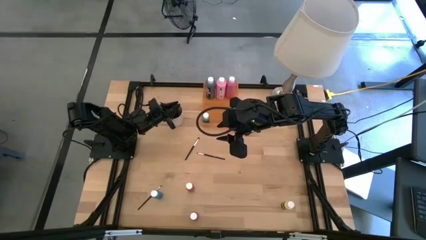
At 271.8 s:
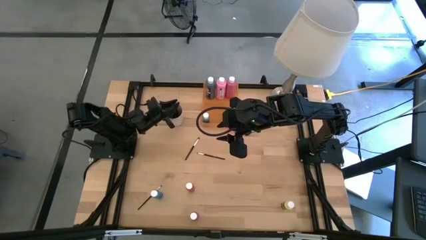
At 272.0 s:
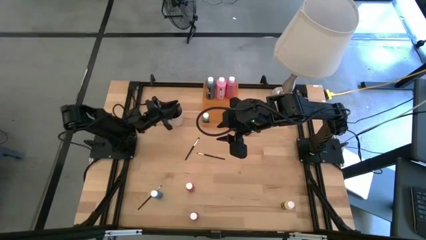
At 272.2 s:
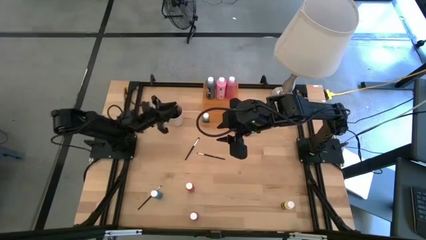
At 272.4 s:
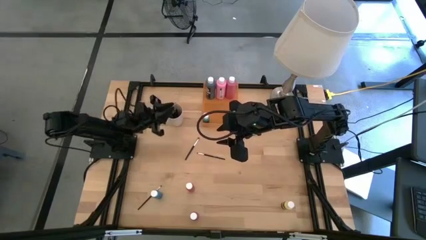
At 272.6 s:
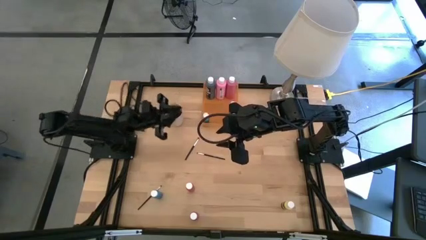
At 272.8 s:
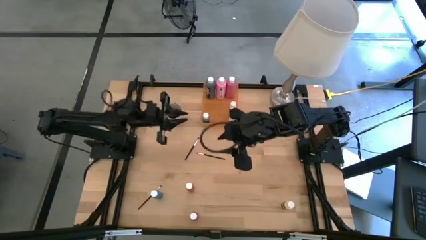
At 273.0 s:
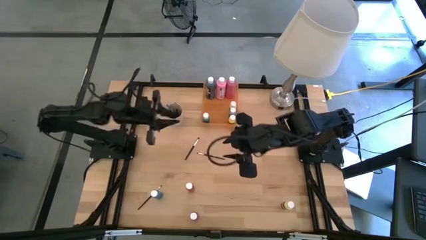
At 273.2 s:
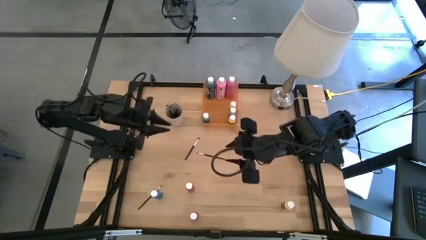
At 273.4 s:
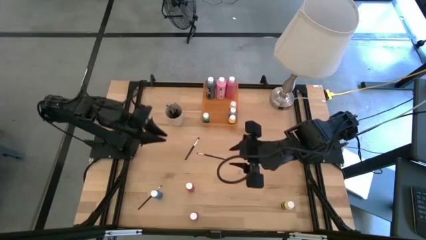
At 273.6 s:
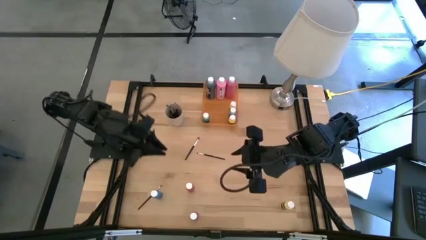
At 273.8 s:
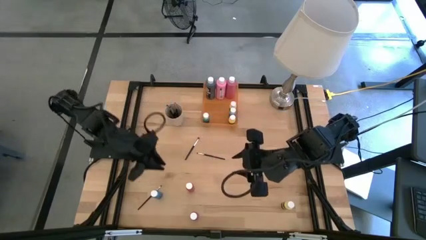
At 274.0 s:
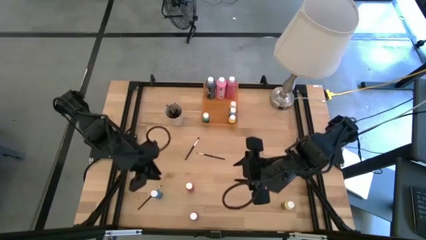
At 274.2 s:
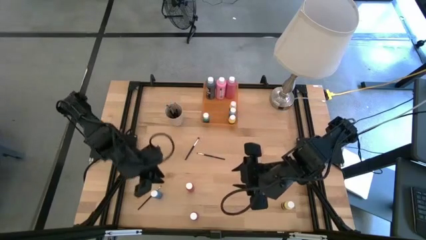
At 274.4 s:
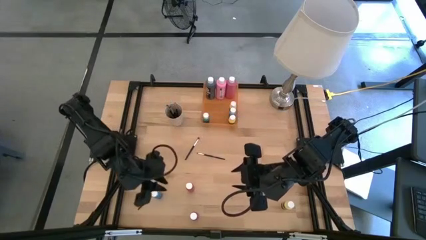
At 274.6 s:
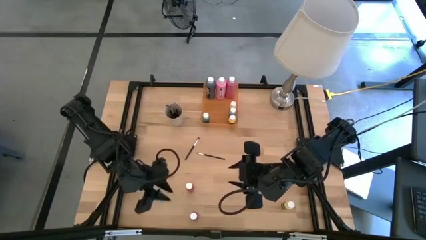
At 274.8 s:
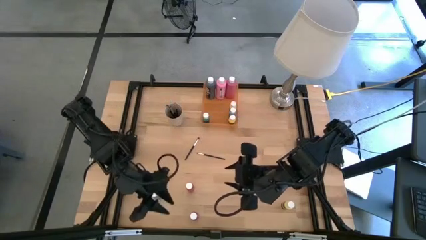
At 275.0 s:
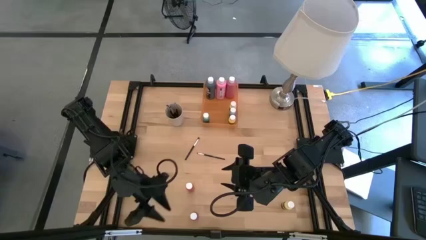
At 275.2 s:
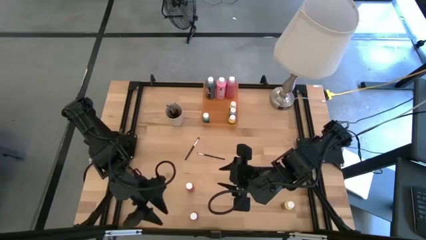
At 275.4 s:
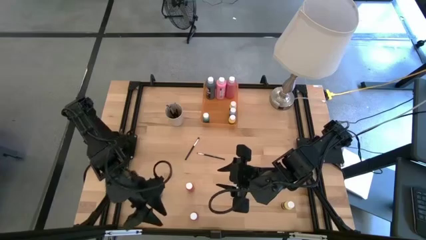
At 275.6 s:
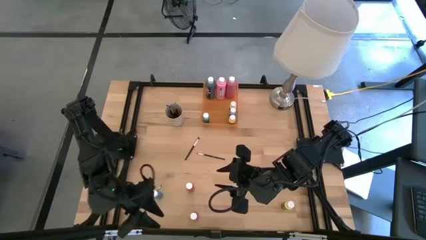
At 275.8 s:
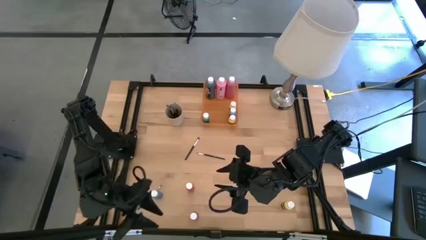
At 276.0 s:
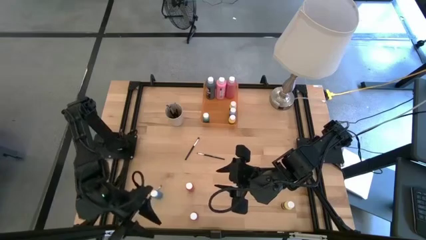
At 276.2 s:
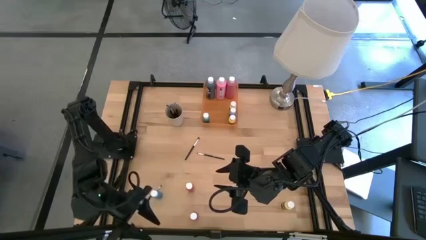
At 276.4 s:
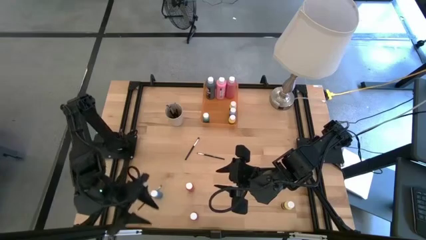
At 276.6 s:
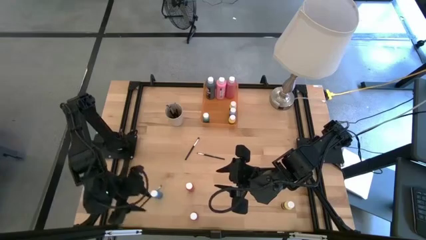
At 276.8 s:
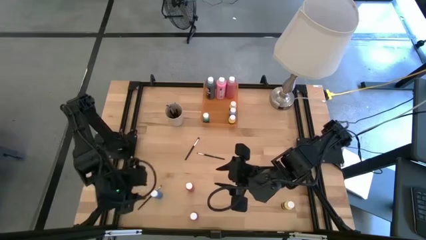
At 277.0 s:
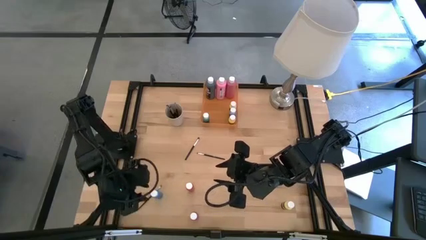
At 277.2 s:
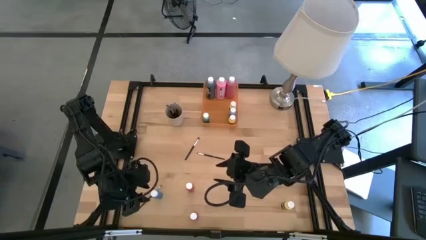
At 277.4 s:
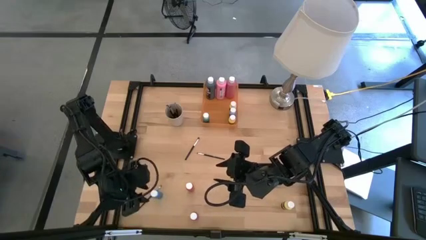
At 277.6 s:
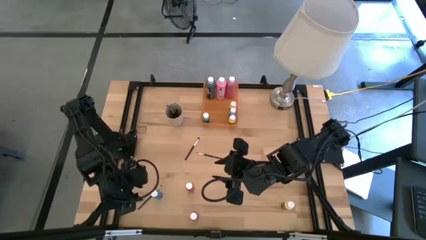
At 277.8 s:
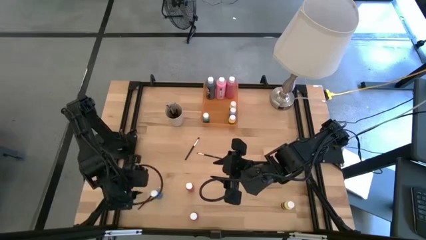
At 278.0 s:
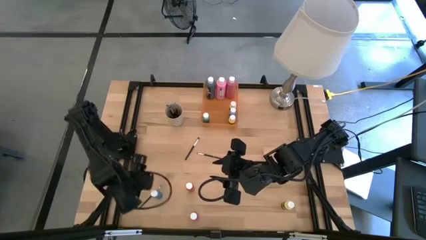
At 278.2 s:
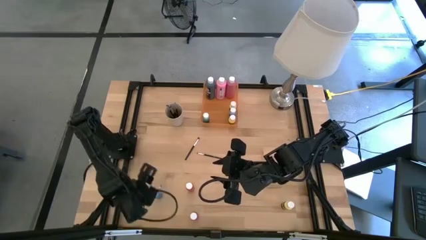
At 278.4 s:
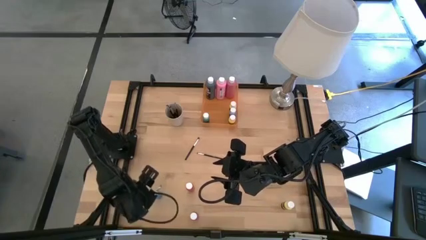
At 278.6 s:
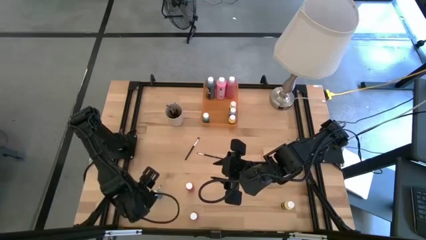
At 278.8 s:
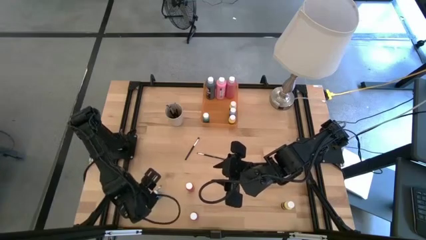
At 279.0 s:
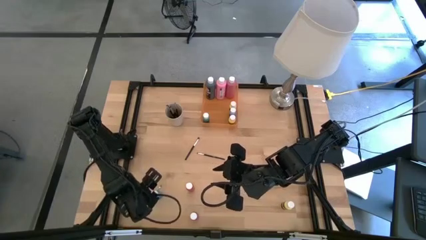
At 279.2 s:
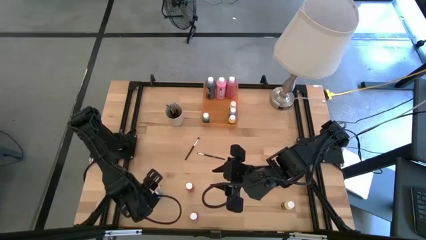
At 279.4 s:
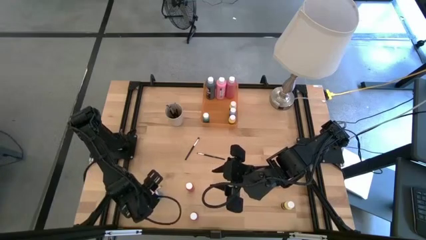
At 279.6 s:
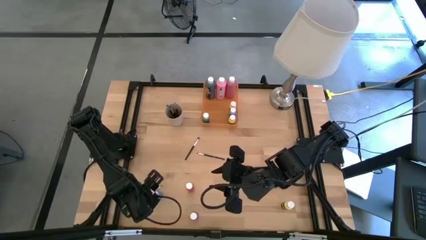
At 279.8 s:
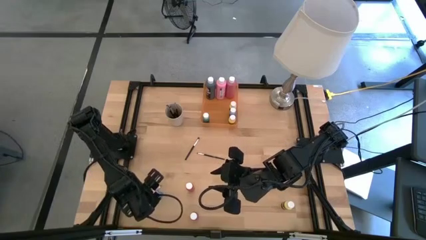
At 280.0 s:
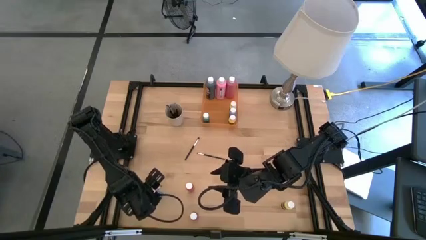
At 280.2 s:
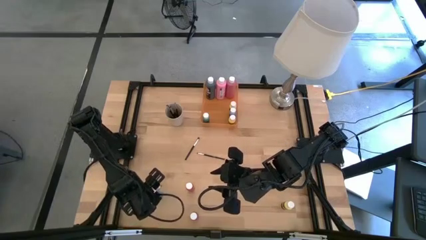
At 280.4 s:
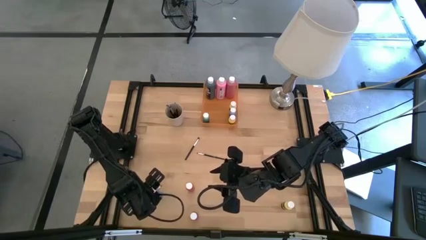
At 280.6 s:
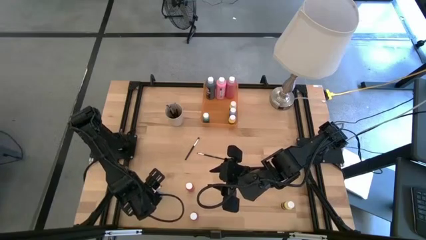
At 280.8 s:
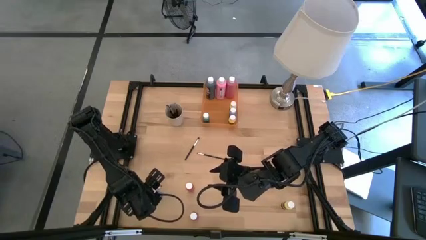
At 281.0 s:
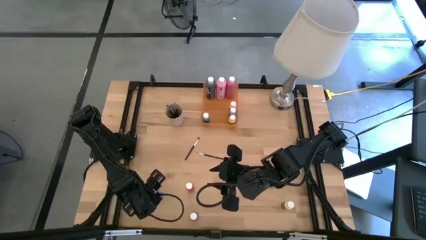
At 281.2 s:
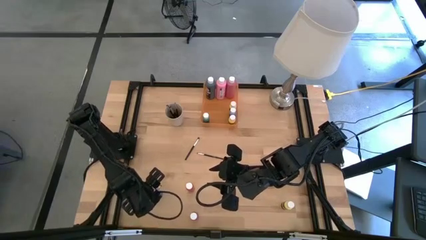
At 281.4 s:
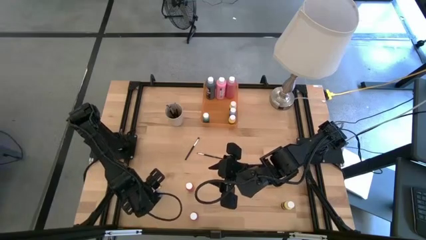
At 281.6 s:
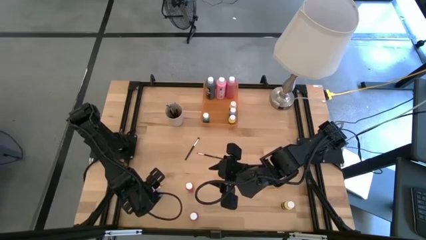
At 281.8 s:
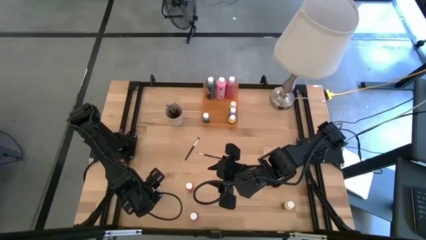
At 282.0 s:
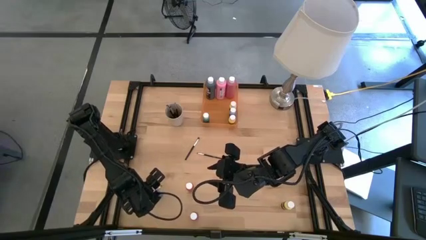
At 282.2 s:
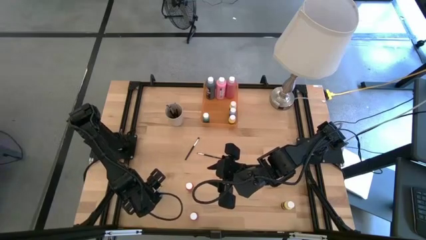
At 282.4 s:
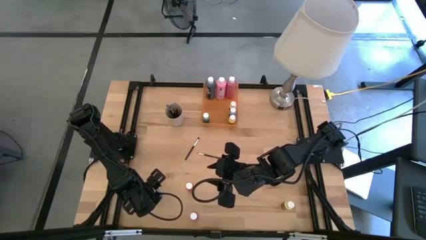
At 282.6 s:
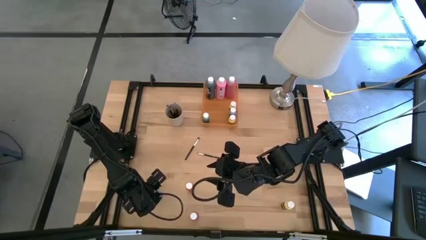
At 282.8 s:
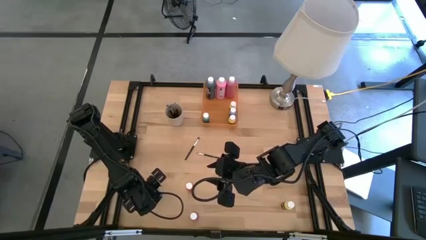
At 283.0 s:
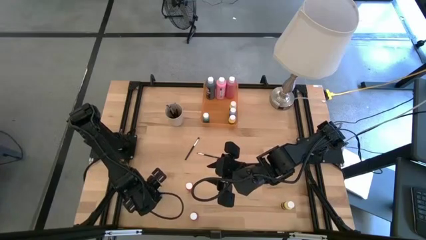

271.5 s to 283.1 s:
Task: Pick & Place Paint Supplies
Put the blue paint bottle into the orange bin

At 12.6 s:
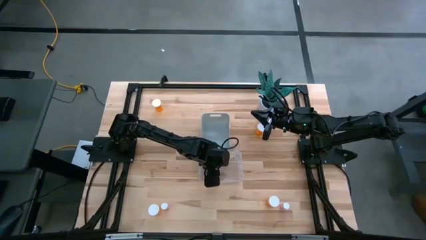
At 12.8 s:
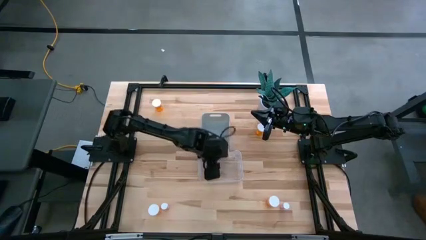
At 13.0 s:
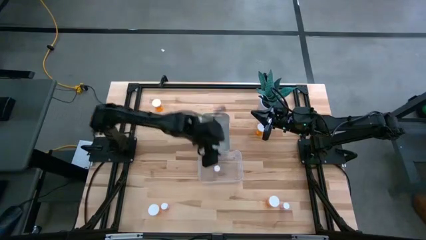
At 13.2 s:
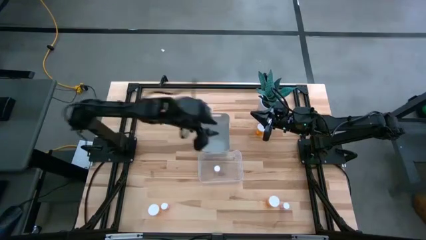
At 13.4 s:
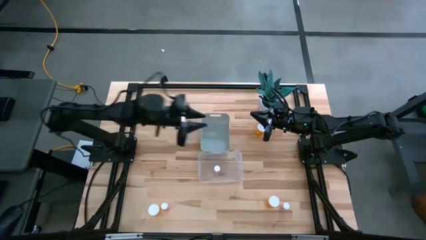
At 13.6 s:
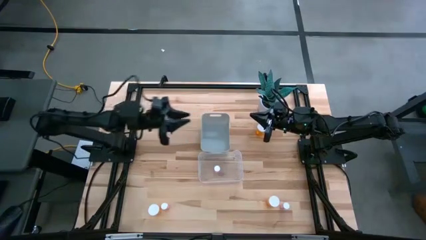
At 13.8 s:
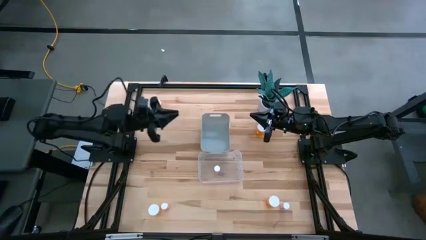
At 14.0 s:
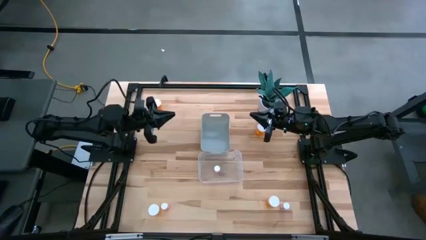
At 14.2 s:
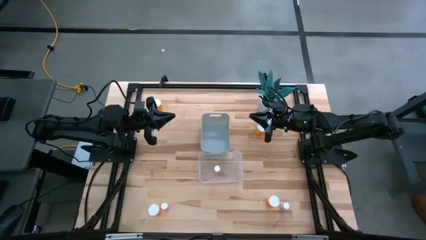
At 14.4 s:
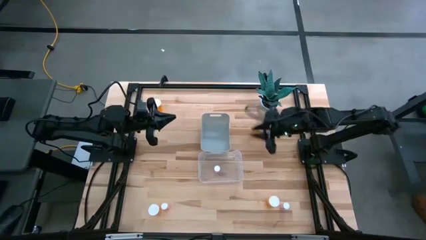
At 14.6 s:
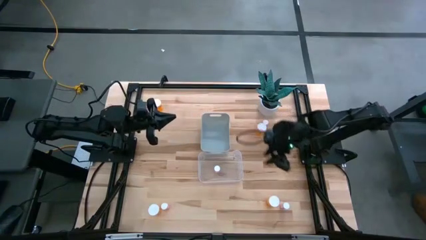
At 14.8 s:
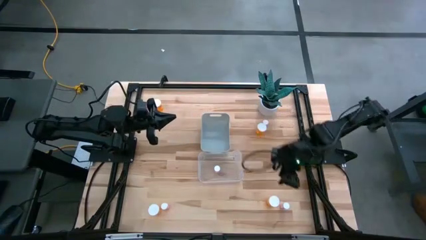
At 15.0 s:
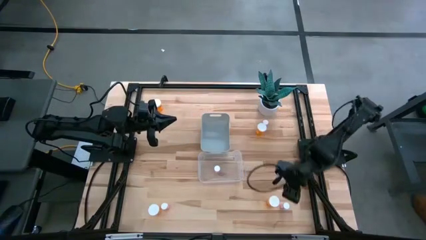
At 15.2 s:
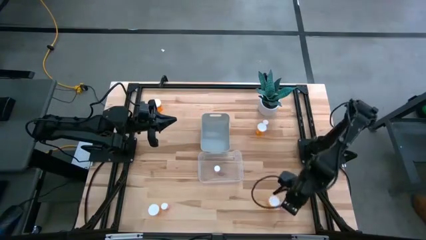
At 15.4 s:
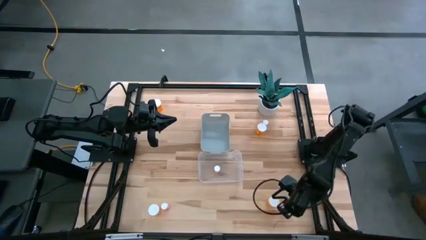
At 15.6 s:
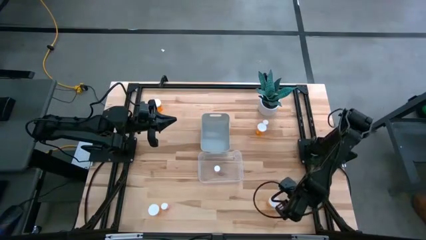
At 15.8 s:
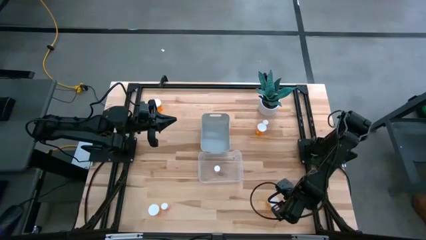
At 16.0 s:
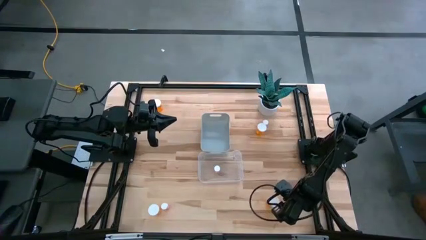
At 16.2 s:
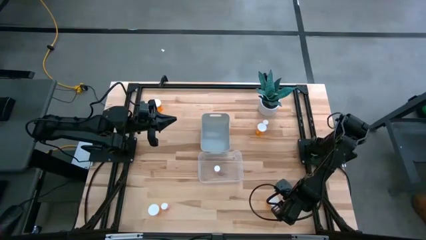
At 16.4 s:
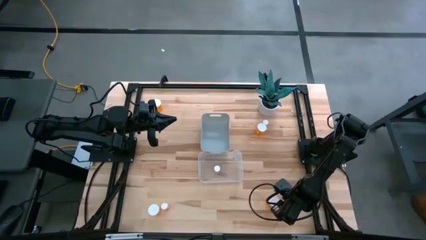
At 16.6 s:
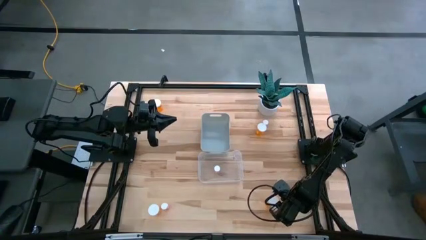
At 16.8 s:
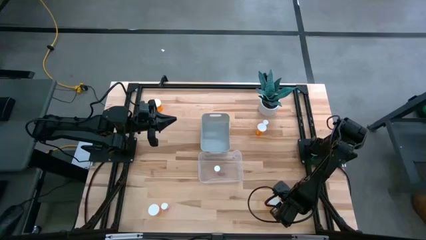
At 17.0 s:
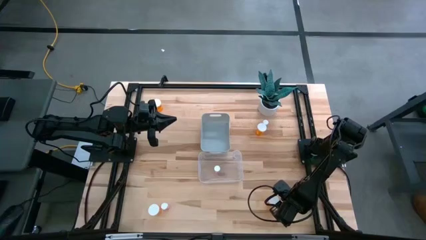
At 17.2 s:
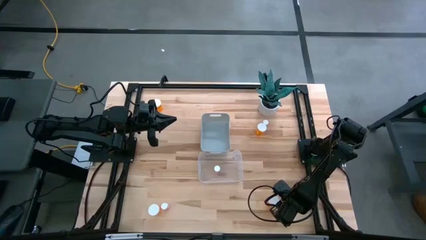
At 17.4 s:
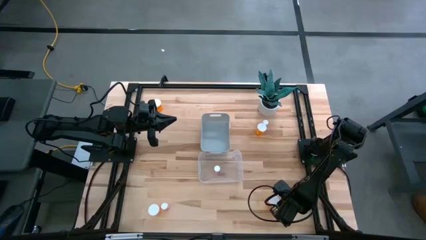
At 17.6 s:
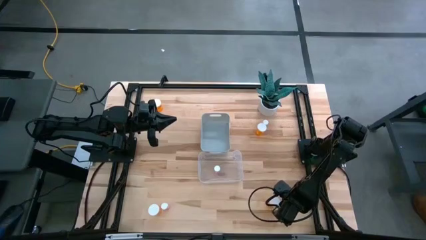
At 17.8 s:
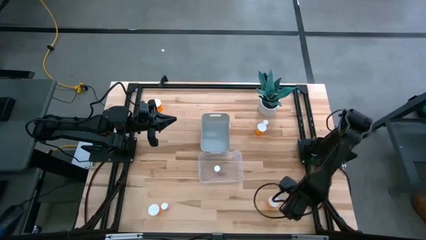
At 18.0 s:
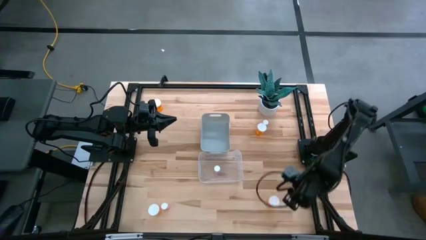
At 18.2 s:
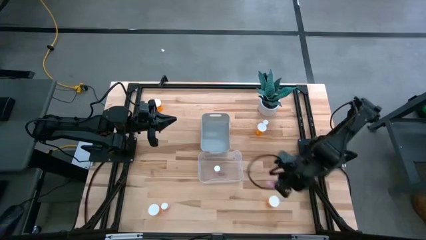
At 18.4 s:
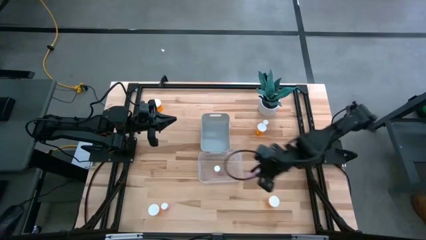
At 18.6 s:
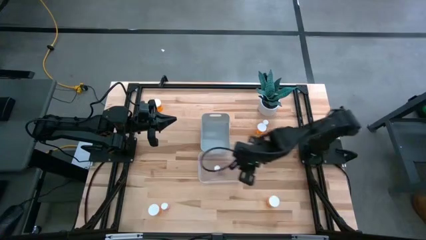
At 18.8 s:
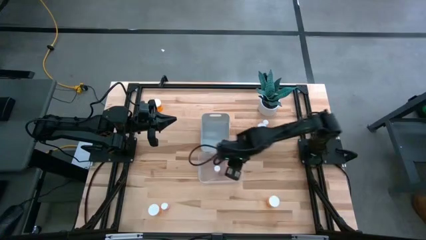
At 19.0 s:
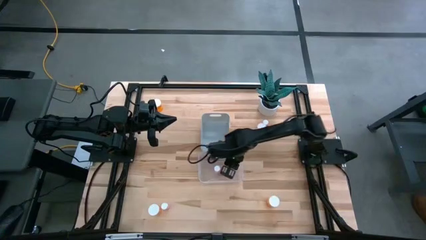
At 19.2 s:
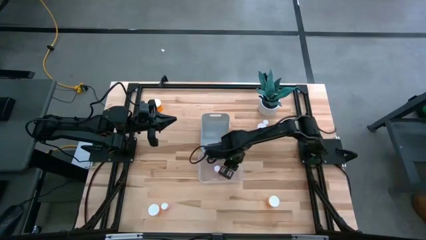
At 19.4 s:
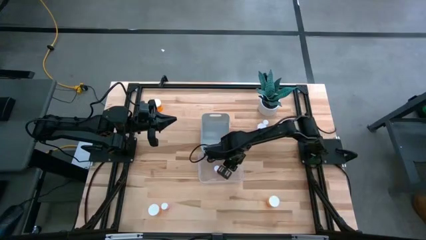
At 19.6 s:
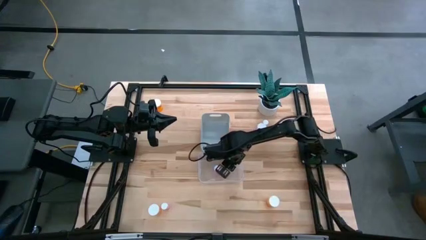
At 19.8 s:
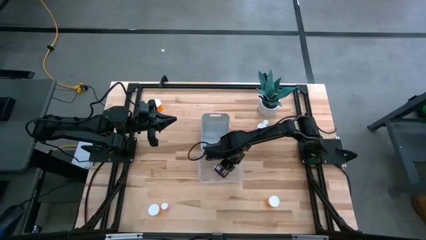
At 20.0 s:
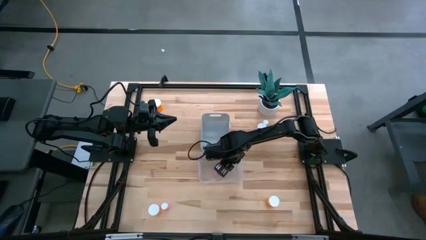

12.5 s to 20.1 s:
Task: Pick and place medicine bottles into bin by pill shape (circle, oval)
Put the bottom right pink pill bottle into the transparent bin
